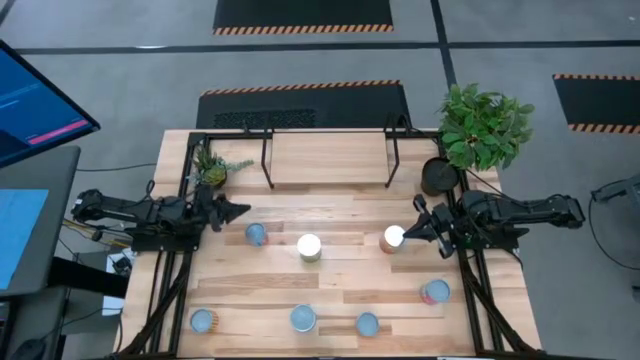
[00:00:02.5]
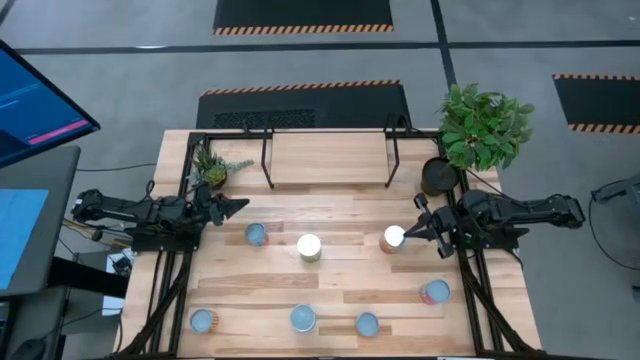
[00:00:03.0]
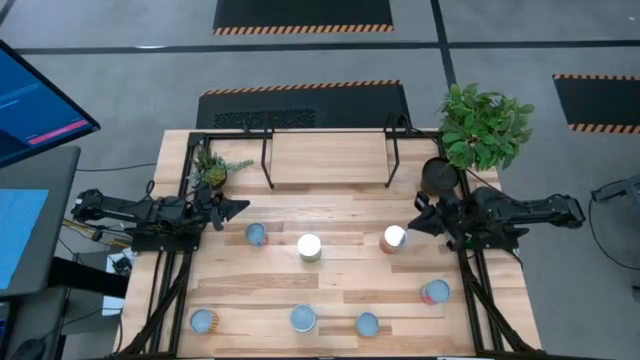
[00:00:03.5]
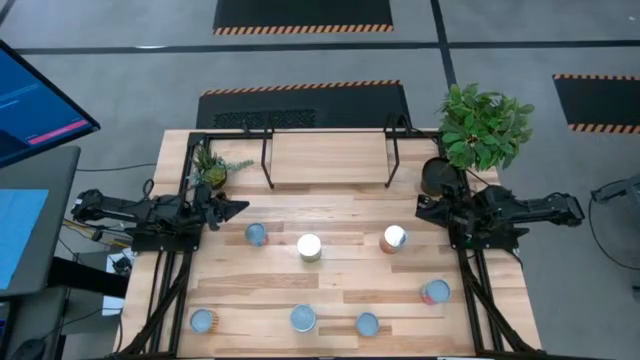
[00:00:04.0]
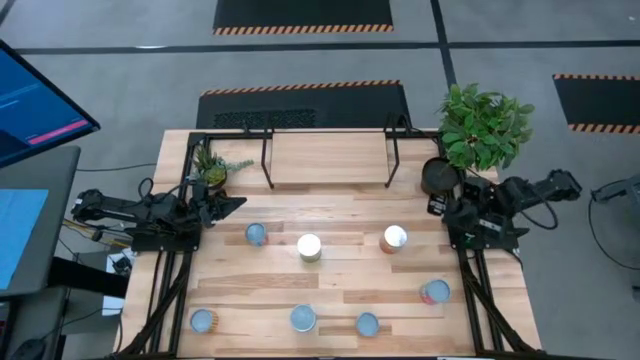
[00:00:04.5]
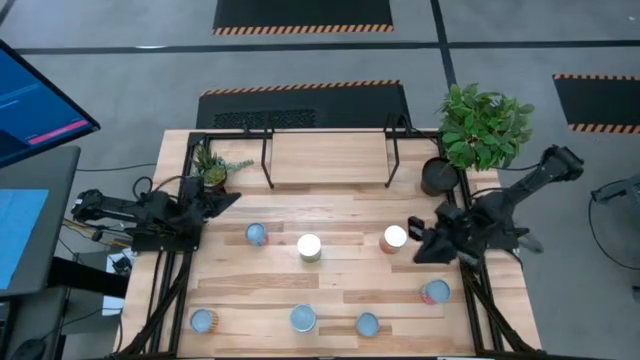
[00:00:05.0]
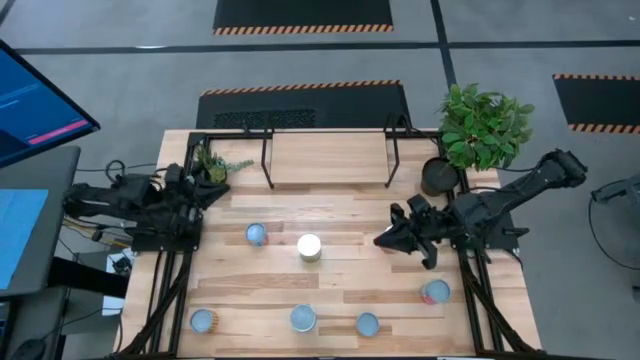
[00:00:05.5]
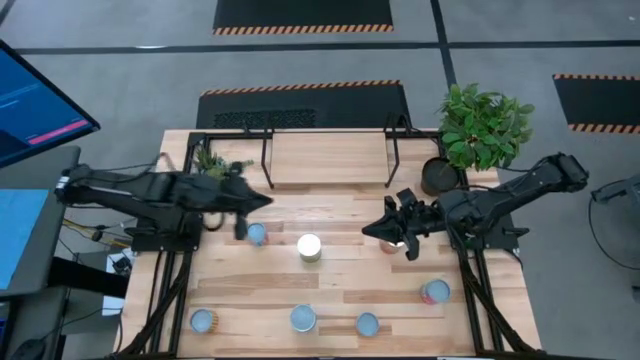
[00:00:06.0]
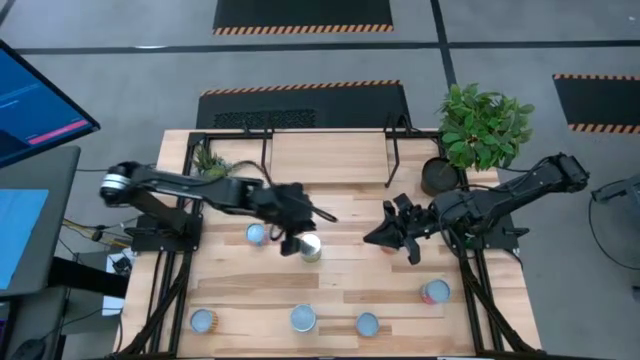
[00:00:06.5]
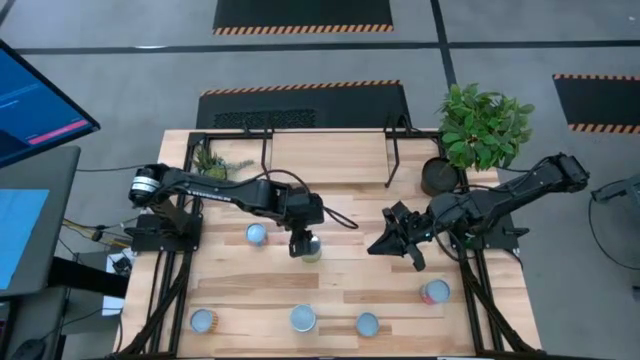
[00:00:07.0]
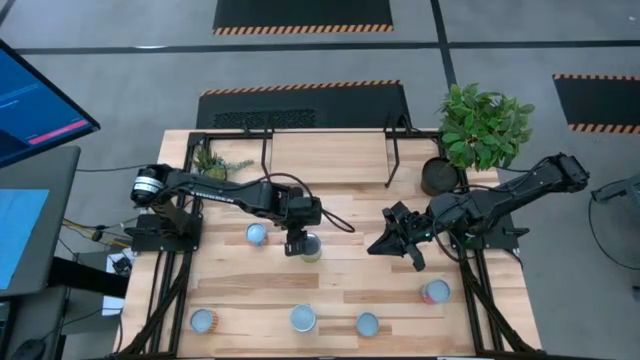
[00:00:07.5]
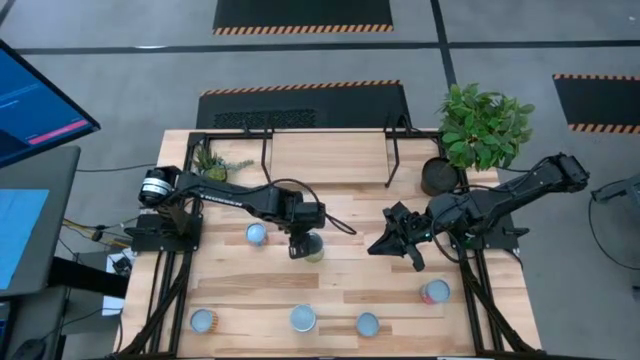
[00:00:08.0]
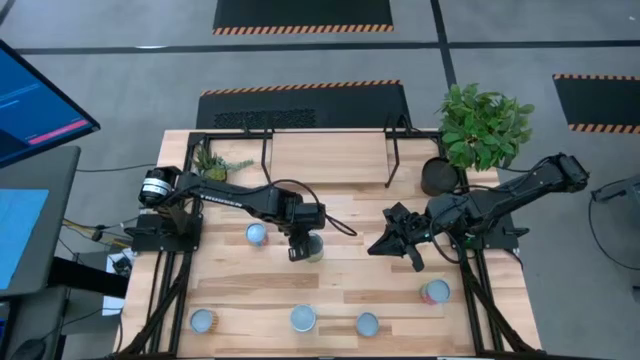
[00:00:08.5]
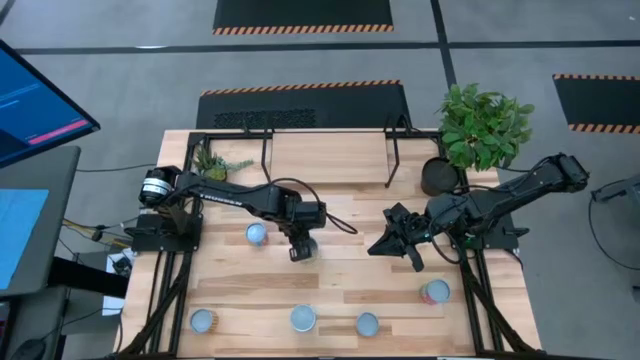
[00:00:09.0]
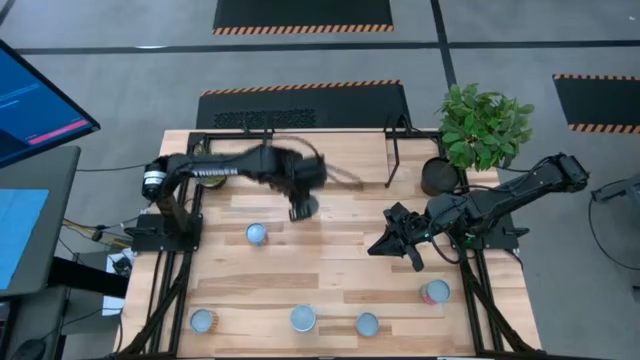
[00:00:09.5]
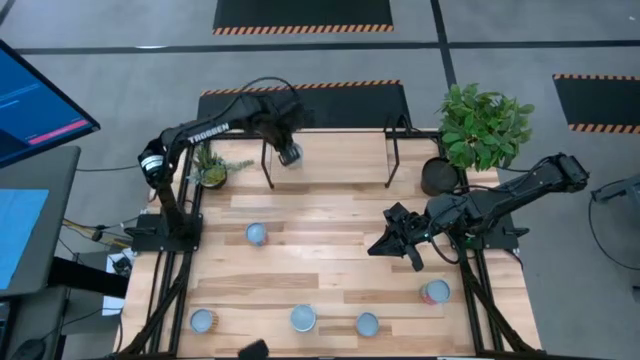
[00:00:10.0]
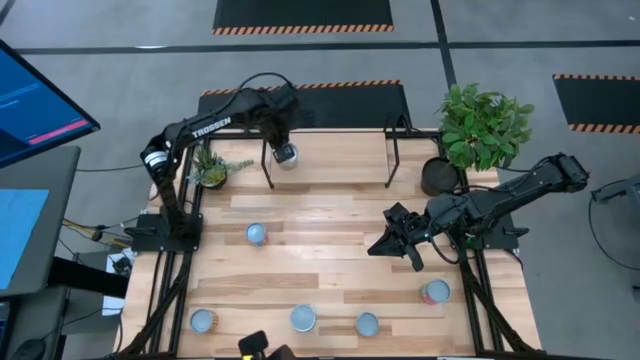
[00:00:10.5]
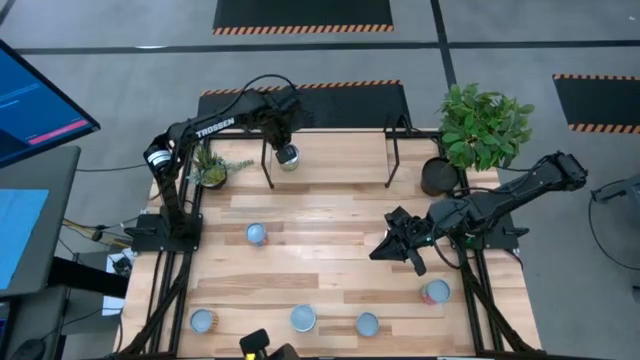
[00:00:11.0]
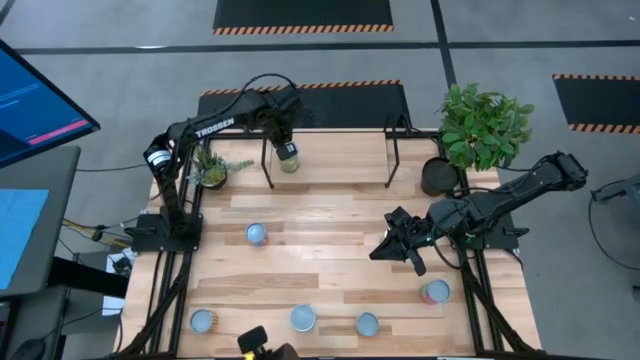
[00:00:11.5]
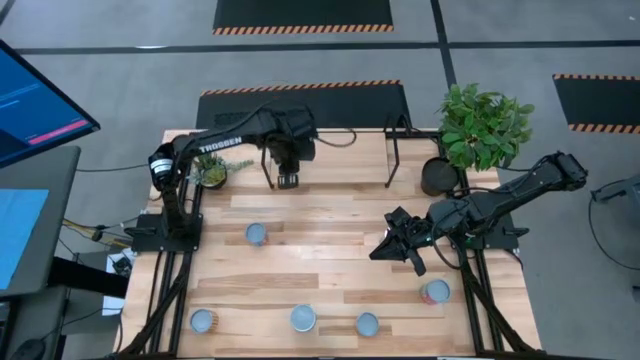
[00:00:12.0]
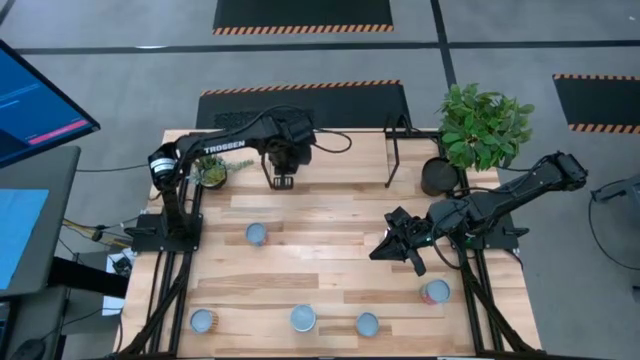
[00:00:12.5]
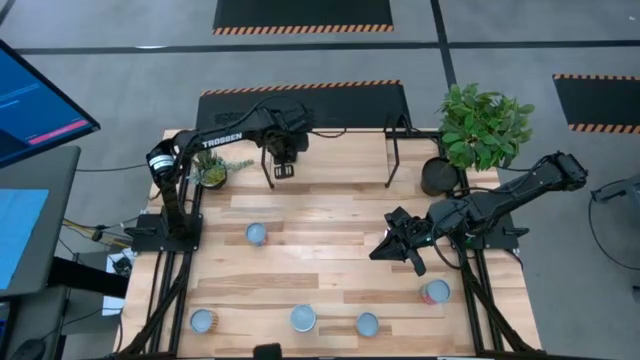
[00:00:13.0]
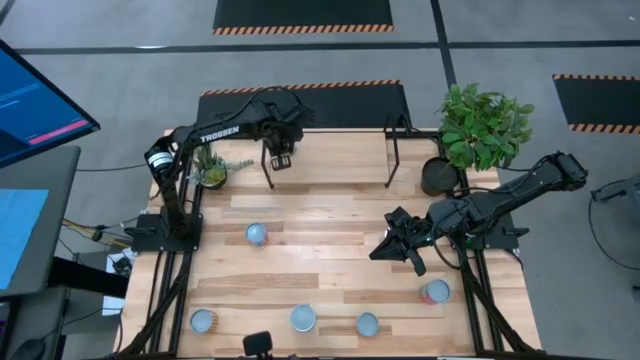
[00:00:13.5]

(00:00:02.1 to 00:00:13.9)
Task: Pick and place cans onto a shelf
Put the canned pears on the shelf

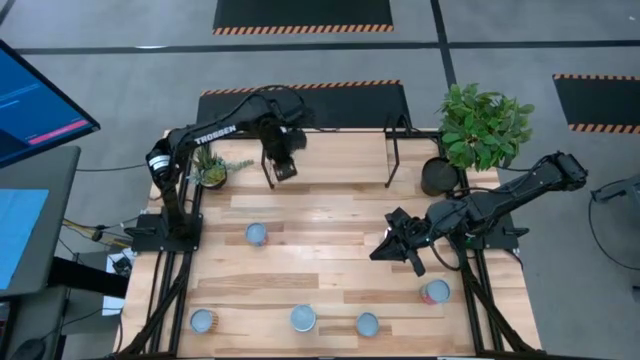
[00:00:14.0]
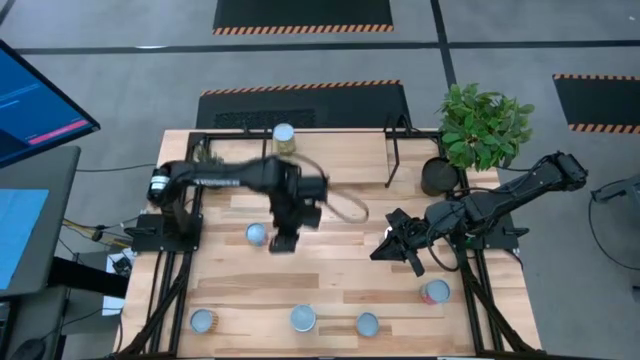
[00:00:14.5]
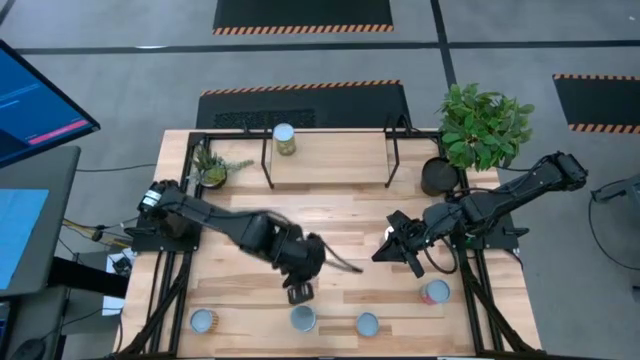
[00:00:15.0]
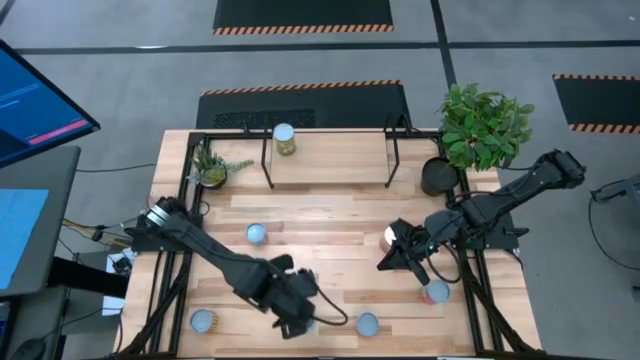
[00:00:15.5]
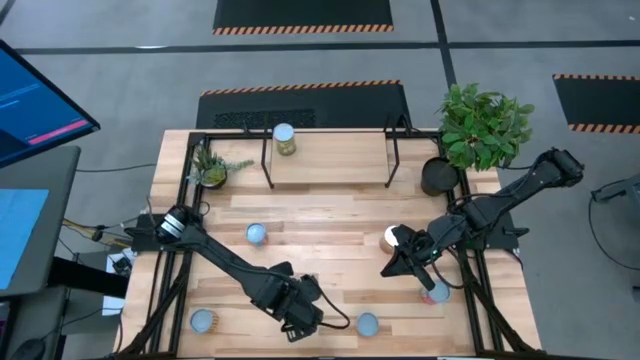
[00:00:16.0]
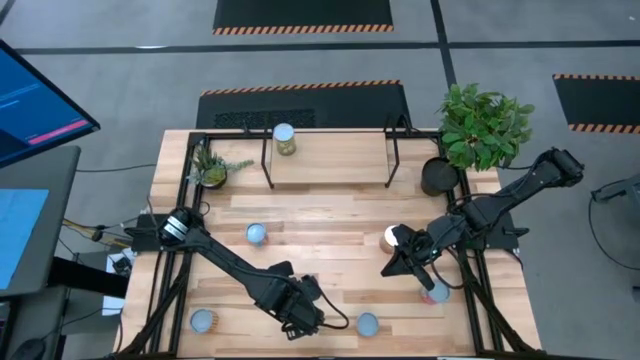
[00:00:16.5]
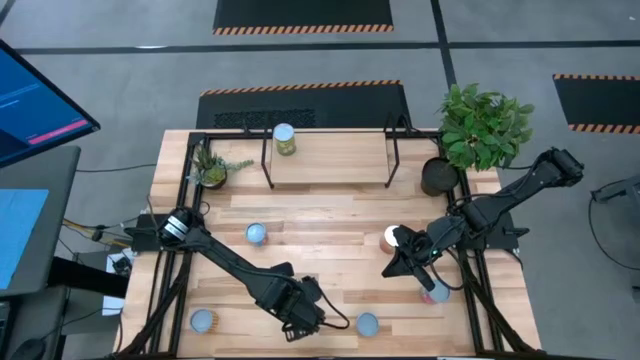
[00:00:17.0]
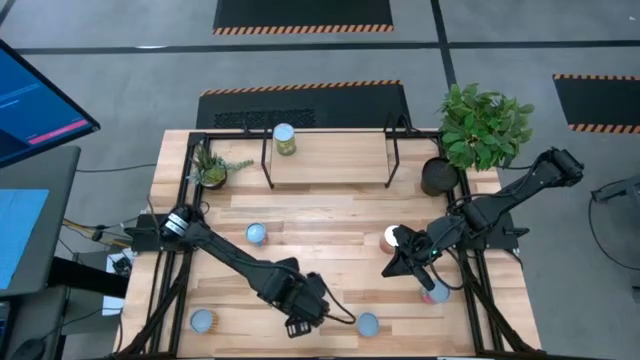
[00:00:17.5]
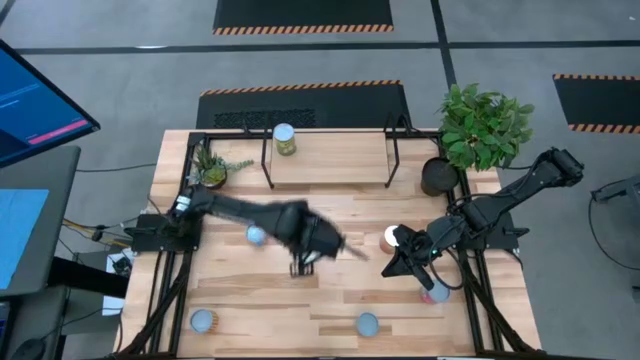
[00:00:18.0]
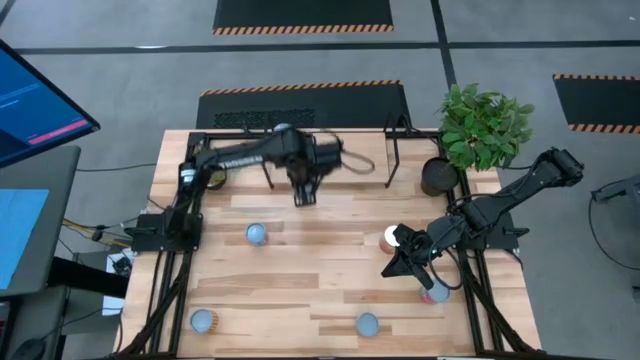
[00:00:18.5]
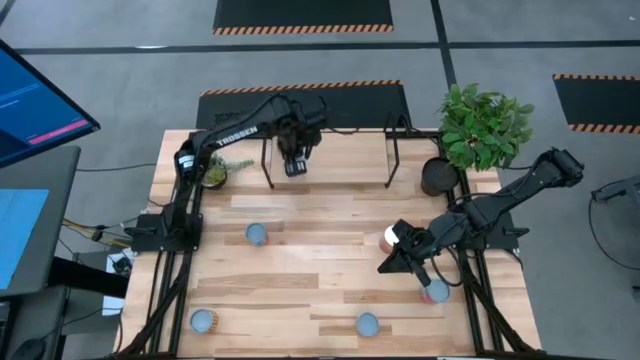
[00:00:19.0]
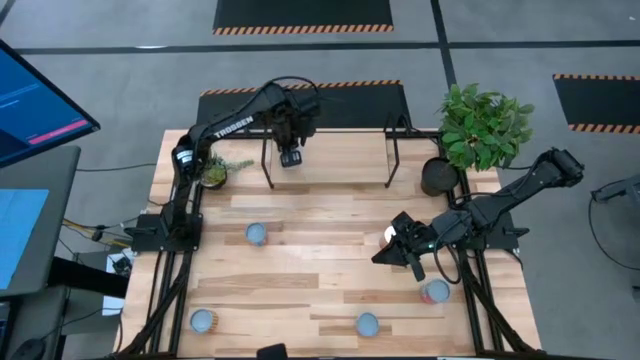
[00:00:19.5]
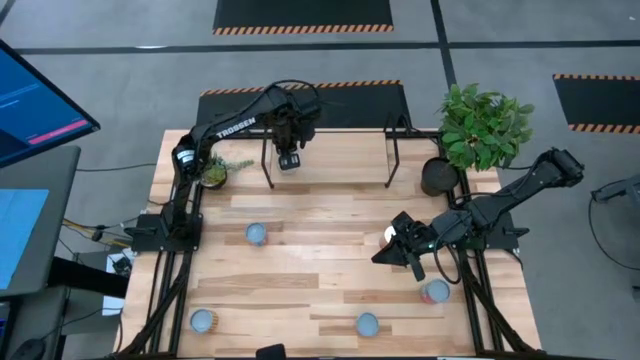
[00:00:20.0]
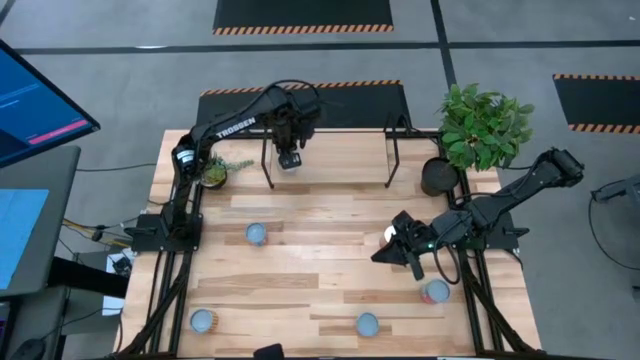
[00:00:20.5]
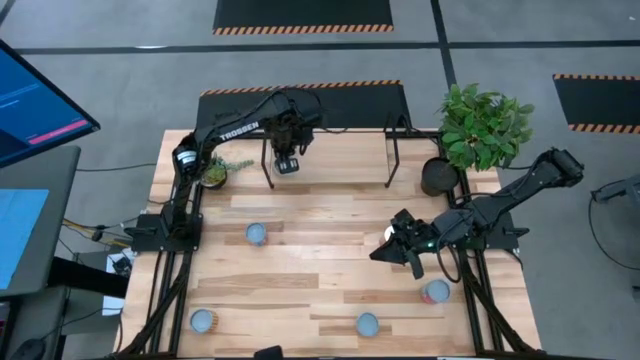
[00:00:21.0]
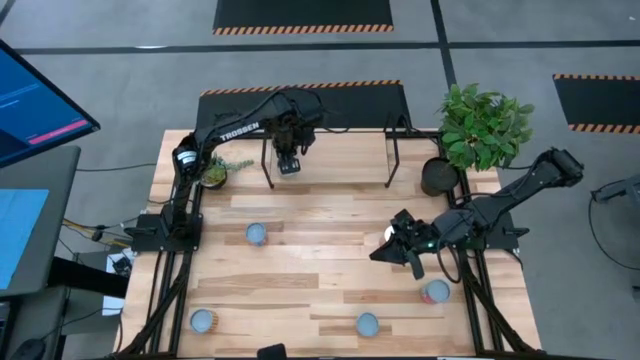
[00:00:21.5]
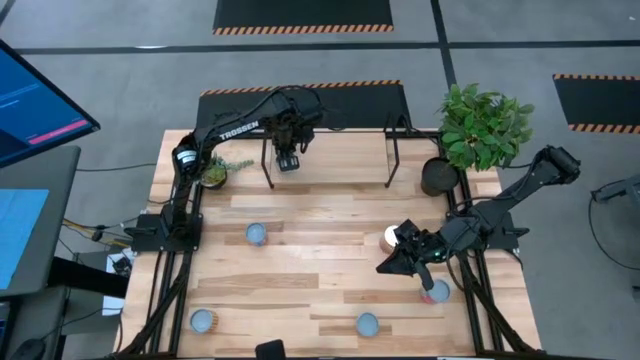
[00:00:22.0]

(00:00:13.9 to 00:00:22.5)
Put the canned tomatoes on the shelf

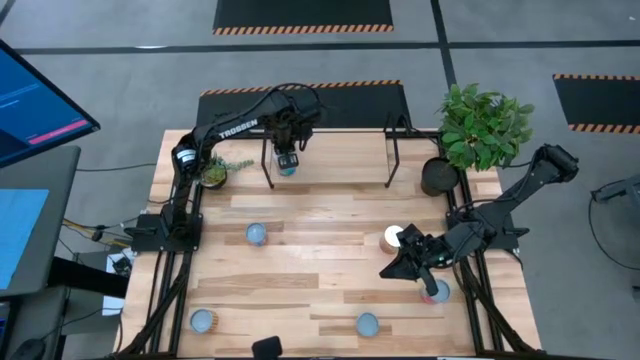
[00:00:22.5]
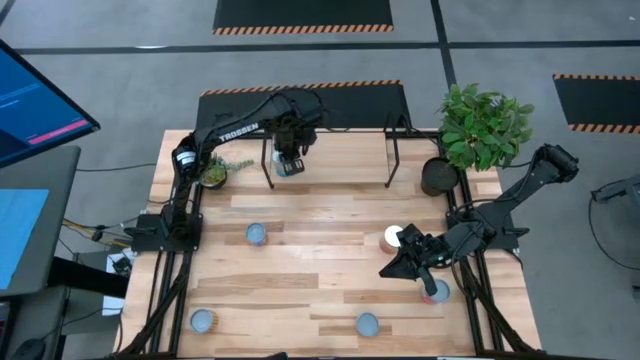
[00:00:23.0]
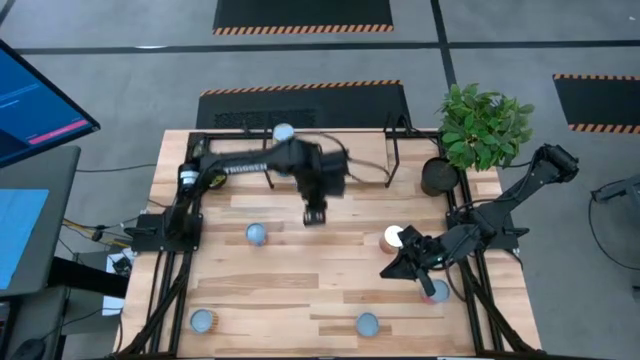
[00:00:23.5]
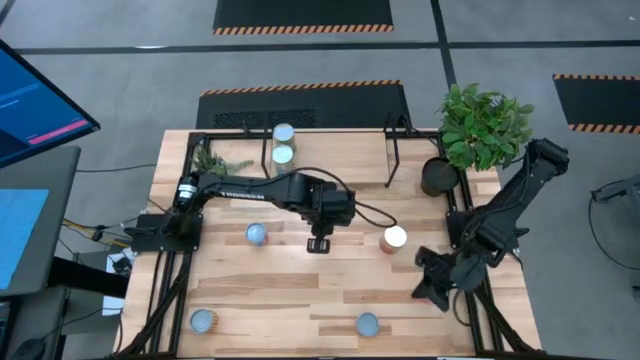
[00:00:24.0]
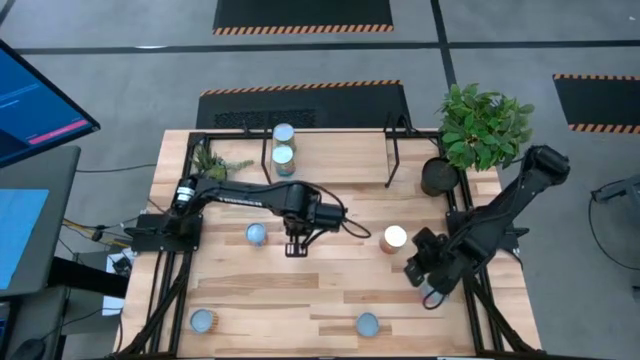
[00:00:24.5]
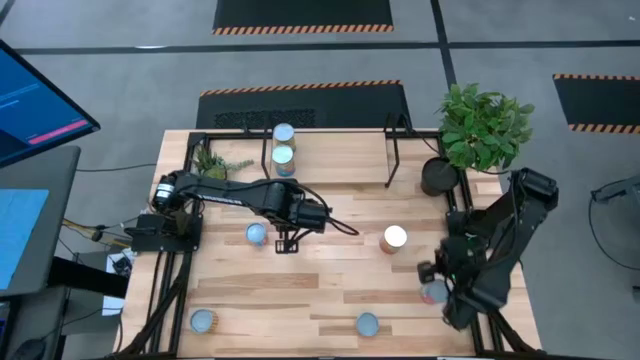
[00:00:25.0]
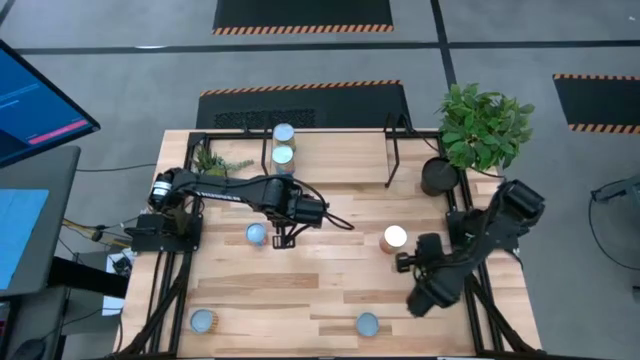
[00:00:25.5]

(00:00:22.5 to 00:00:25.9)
Move the canned green peas on the middle of the table
